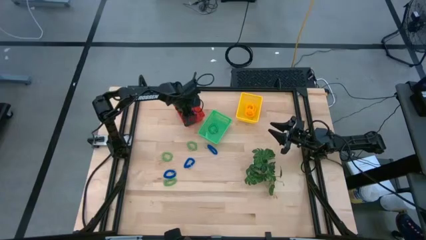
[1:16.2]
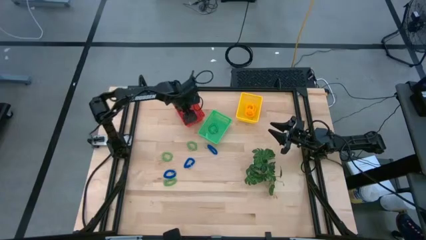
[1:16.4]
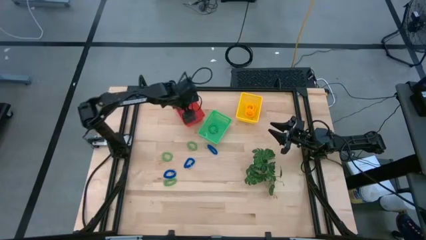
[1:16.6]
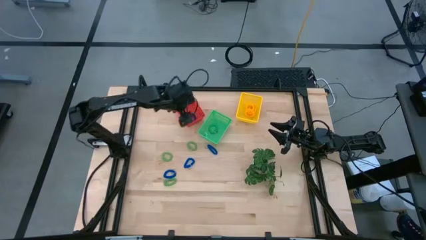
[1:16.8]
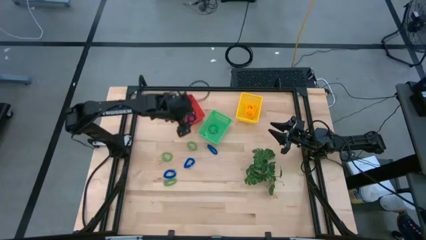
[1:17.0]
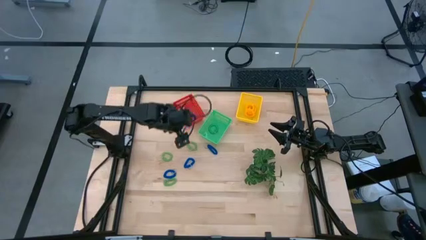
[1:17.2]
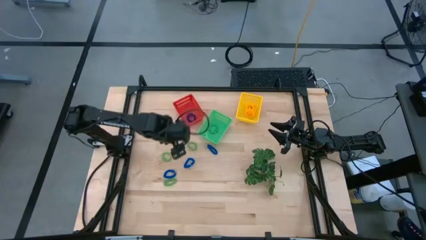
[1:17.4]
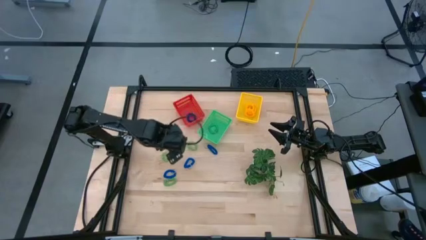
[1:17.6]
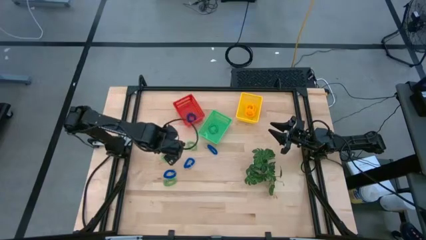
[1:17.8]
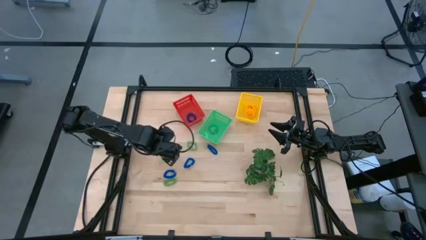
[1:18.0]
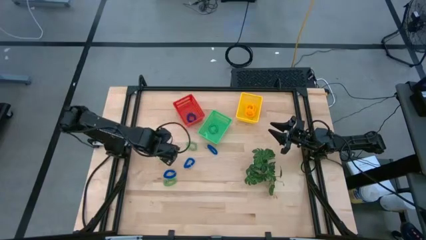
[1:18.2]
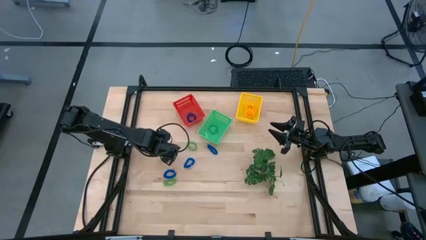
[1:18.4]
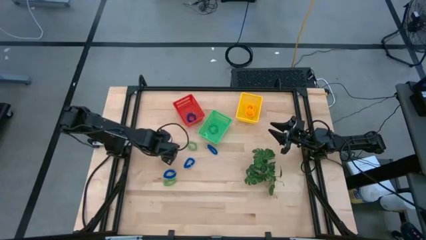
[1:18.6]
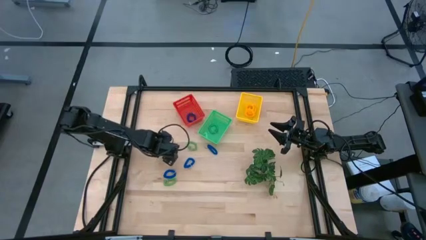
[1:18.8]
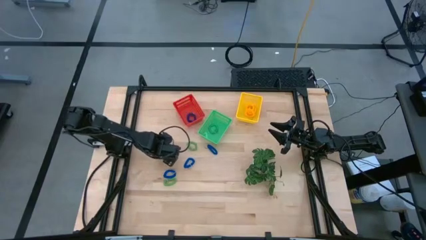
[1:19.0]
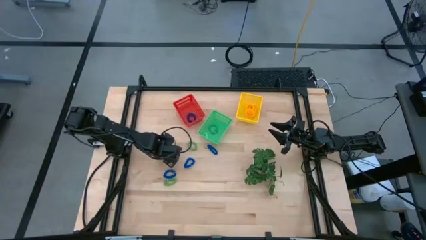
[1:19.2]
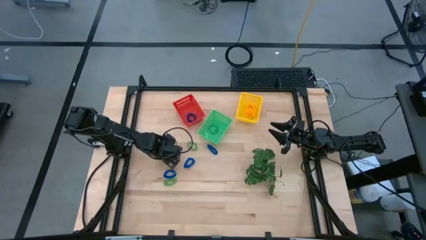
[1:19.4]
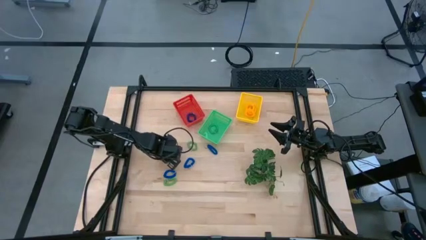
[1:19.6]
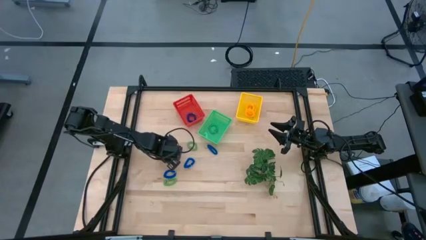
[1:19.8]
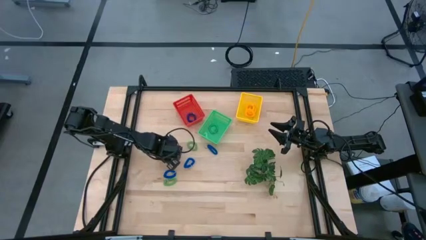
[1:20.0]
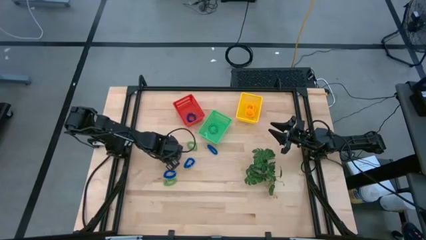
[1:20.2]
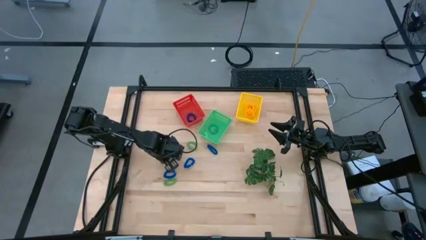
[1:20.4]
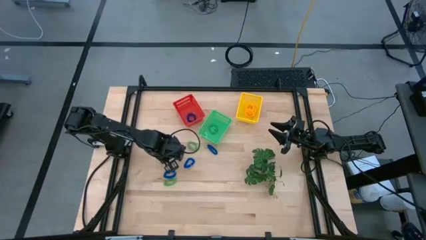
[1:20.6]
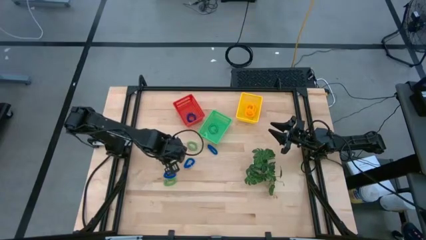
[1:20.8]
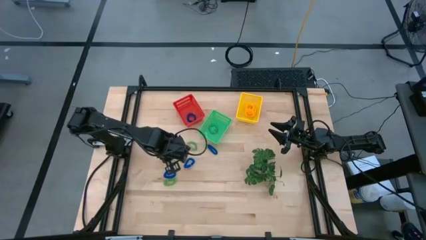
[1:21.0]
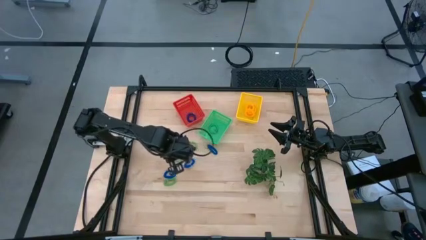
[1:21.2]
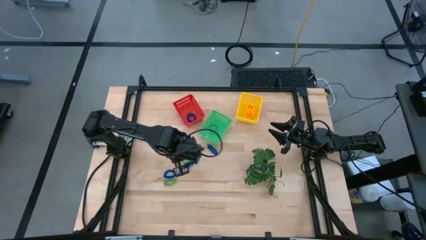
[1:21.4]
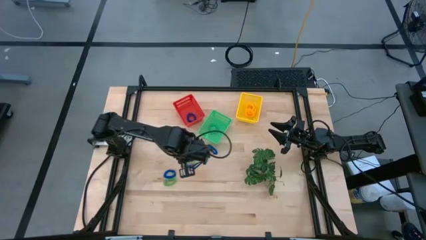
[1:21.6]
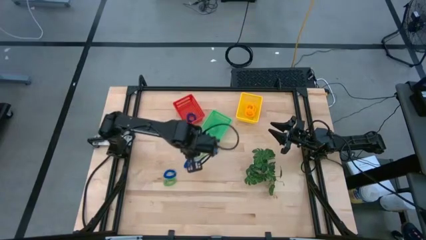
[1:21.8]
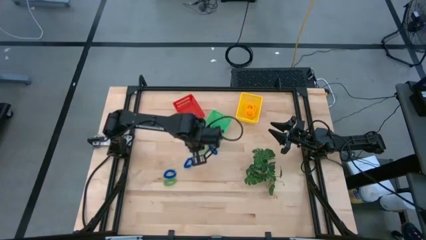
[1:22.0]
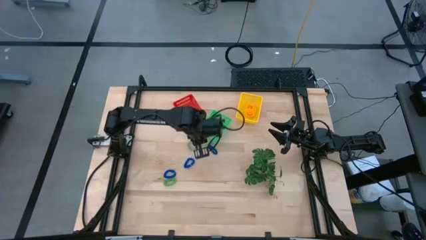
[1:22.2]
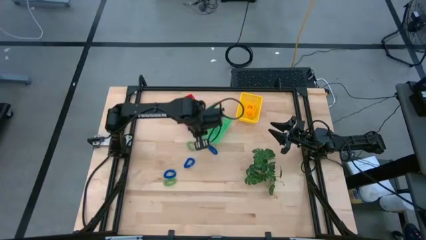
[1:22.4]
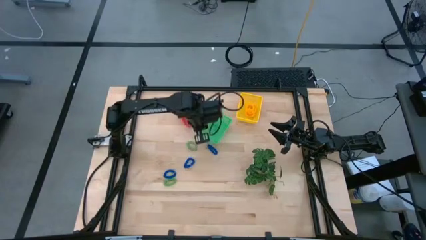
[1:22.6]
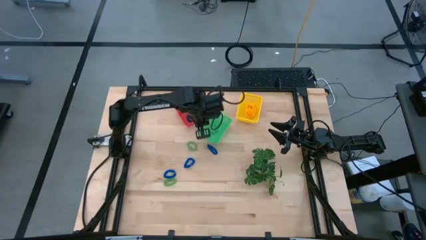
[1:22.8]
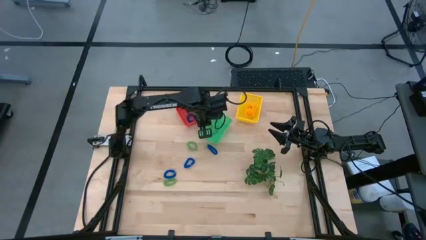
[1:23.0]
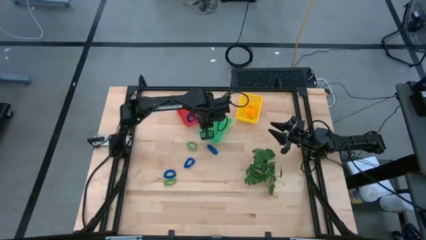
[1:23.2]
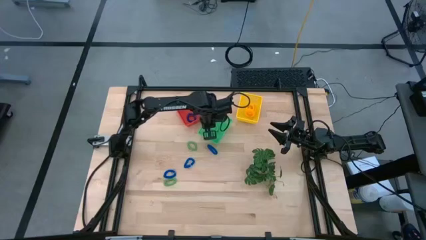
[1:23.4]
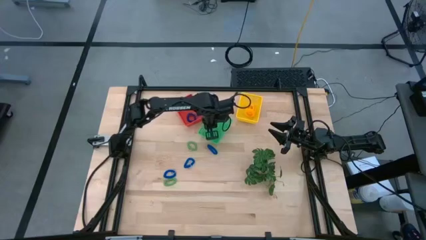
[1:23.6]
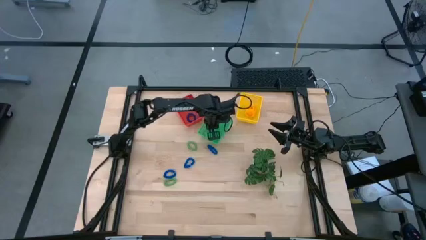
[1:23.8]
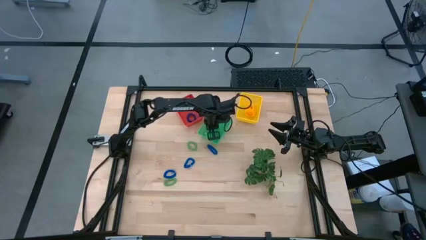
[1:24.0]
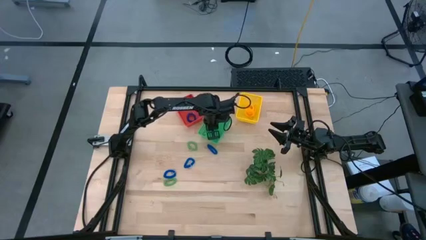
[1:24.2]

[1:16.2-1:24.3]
Task: Sort spring keychains
Put the green spring keychain into the green bin

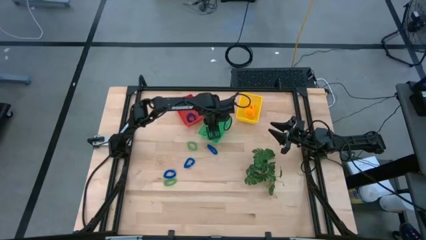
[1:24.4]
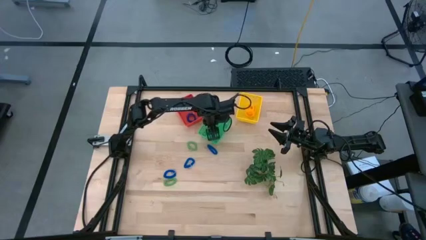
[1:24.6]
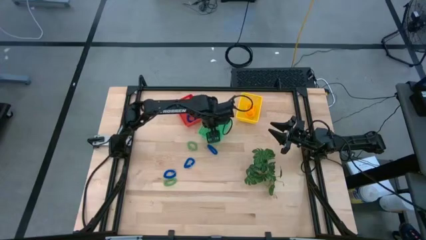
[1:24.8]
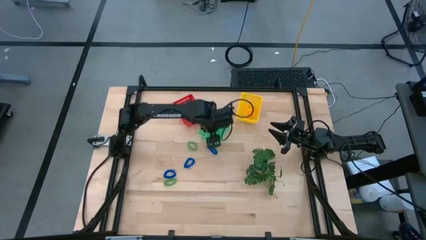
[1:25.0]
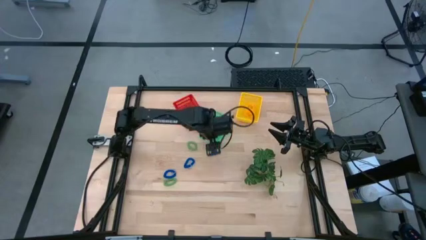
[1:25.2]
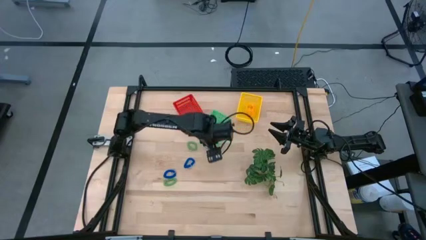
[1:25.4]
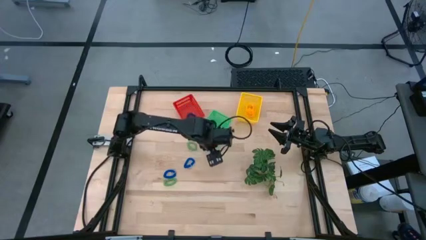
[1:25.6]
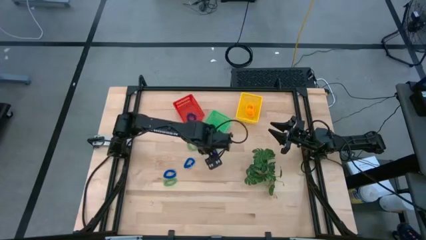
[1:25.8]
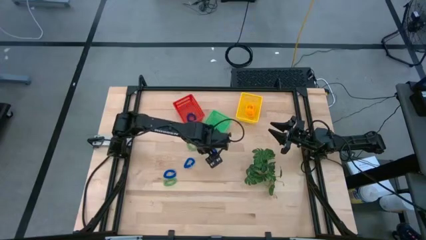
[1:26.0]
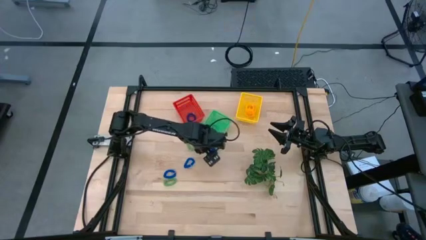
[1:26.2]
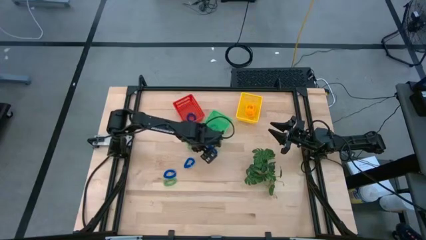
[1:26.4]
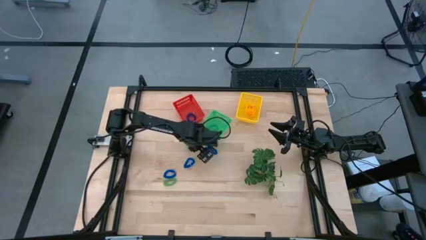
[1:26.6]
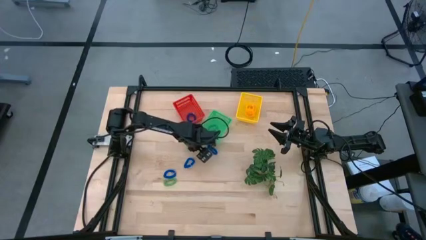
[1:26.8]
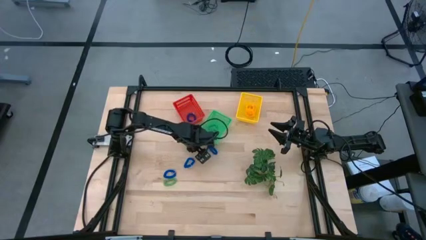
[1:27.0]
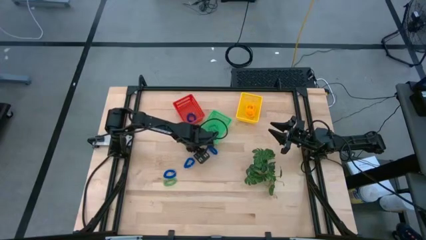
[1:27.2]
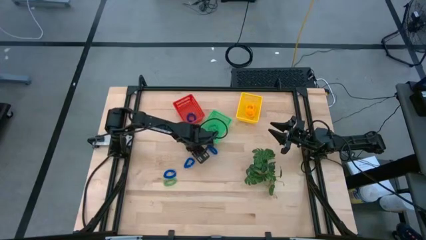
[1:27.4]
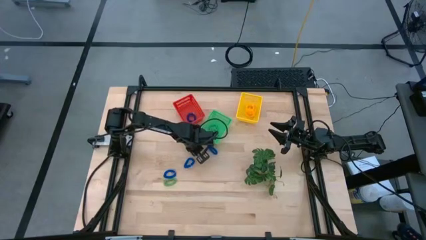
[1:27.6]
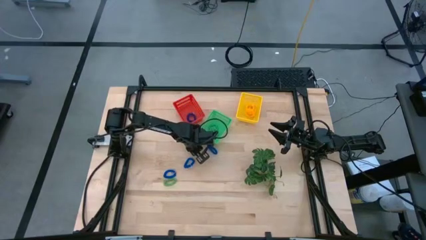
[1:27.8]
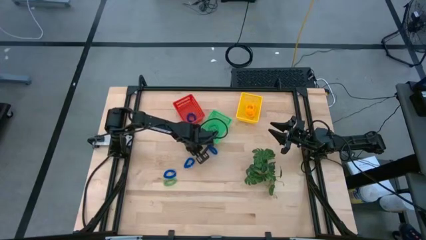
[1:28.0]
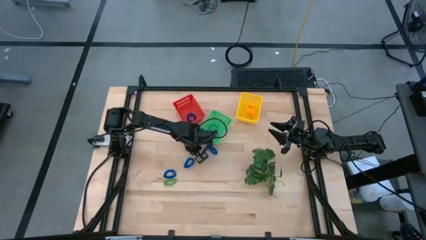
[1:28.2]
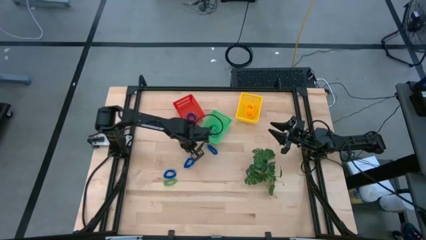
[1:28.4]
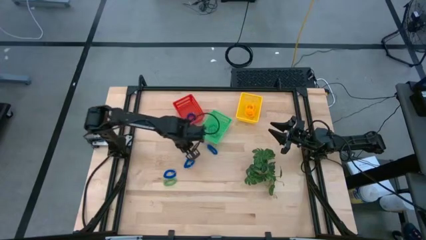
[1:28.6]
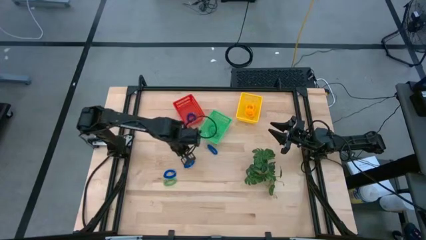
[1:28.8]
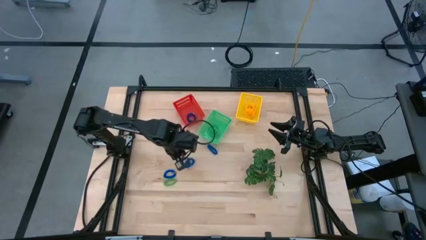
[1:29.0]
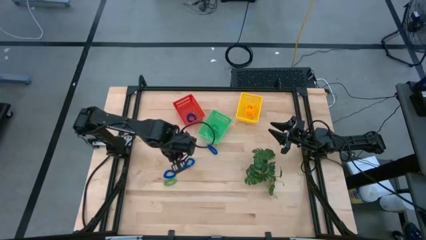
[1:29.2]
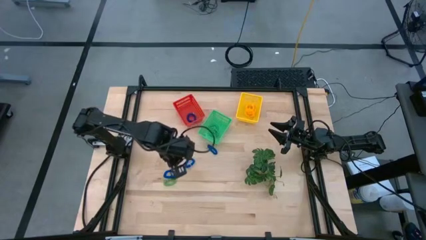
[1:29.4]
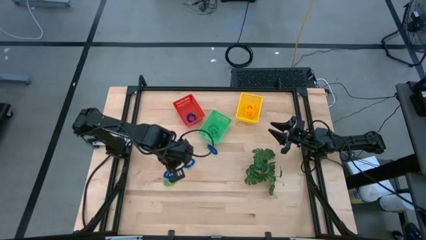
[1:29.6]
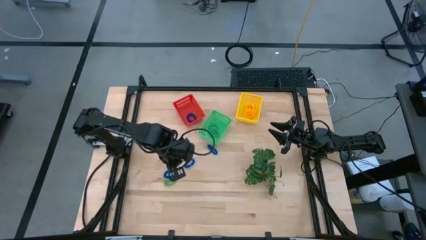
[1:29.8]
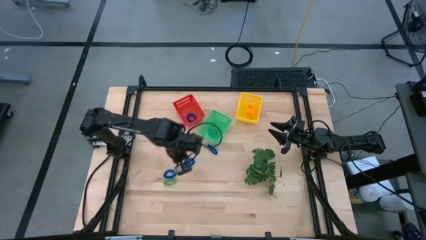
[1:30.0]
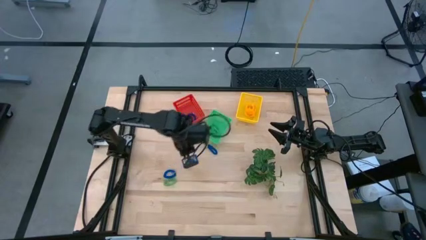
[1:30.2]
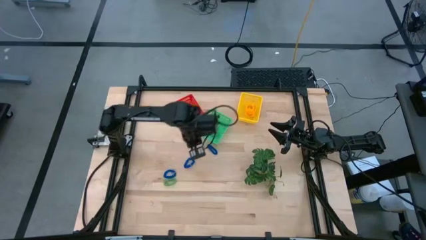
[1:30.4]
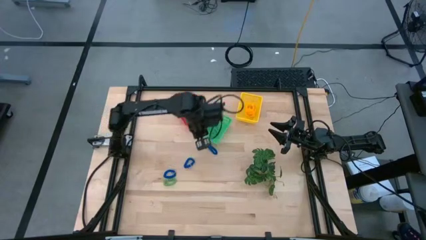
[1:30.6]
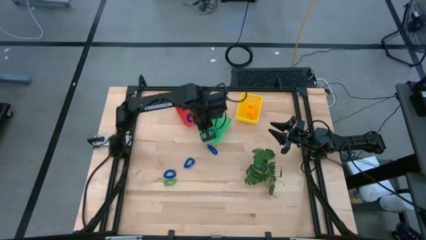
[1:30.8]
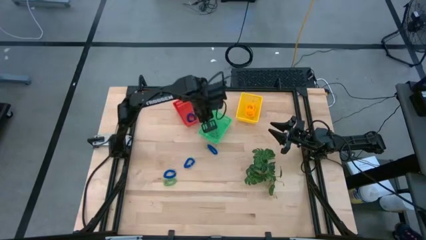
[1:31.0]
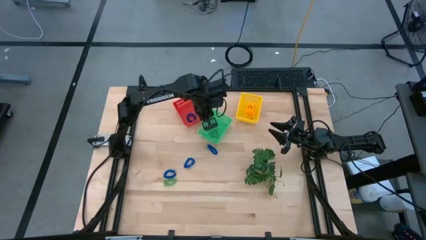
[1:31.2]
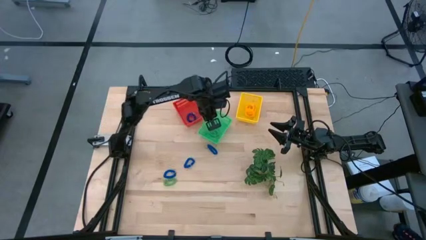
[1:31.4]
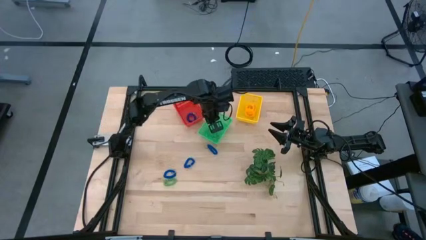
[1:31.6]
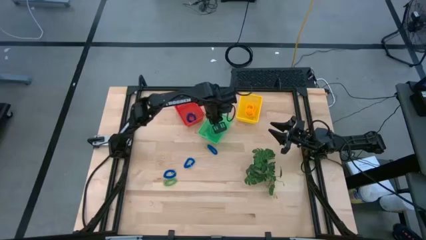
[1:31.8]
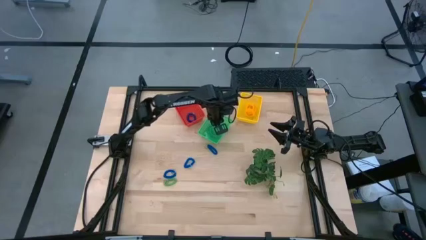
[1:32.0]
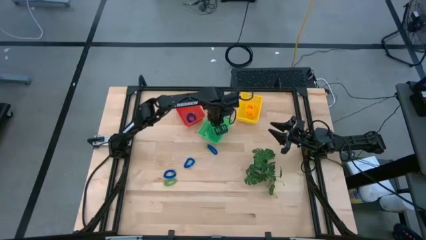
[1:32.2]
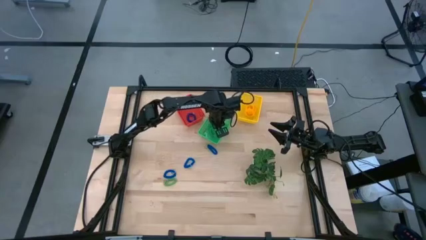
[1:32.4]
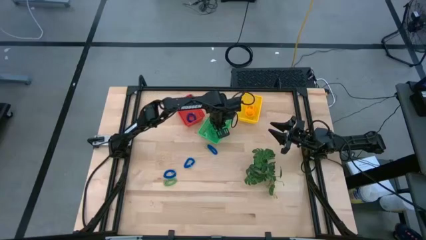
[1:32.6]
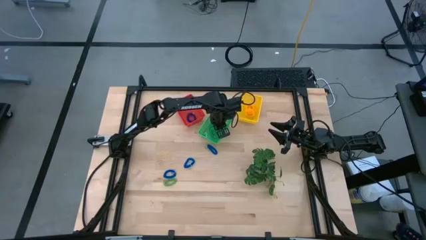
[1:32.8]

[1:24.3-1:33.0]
Put the green spring keychain into the green bin

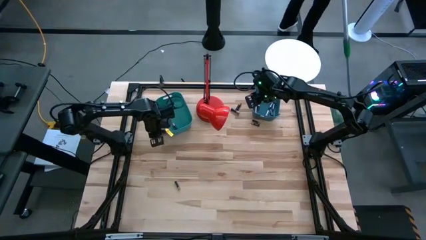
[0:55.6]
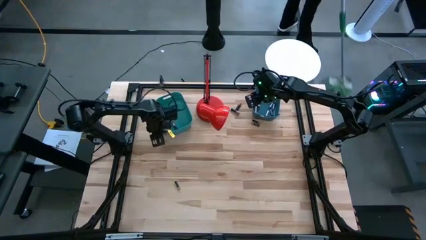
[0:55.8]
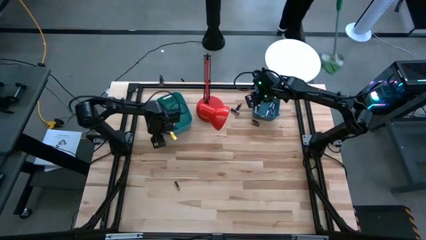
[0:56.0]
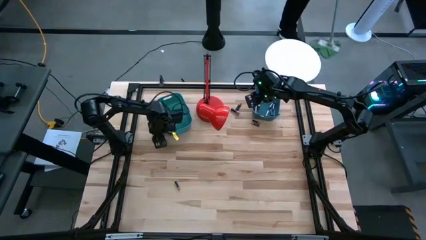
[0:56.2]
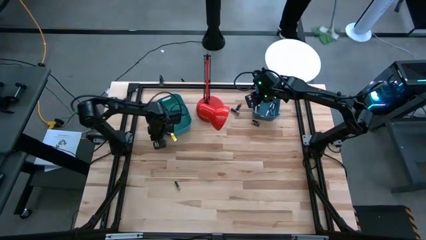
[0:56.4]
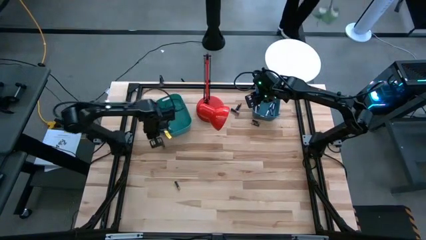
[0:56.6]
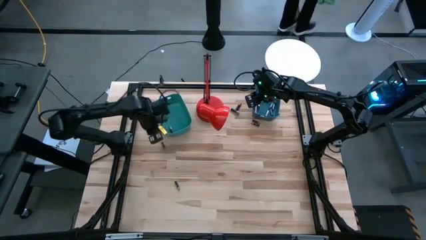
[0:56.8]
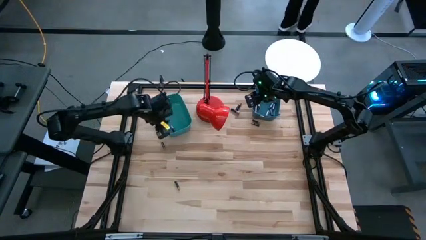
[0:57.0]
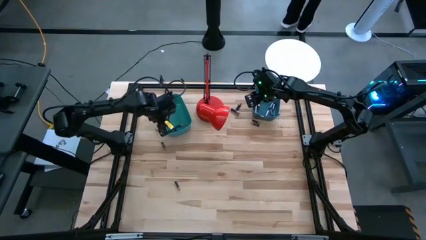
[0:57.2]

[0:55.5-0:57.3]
Task: Sort batteries
Put the brown battery into the green bin
